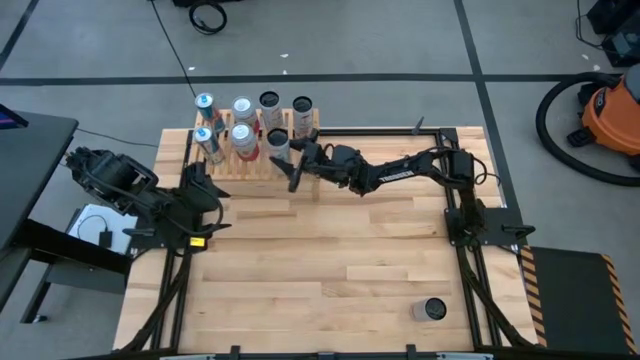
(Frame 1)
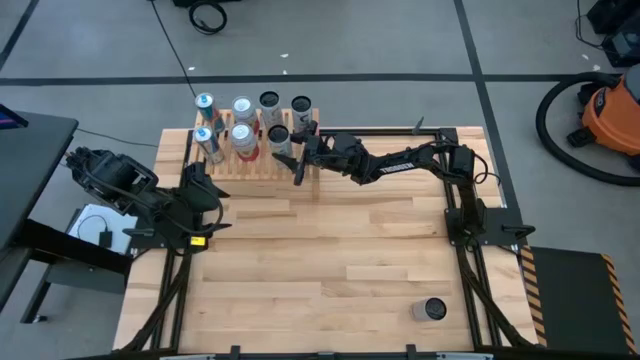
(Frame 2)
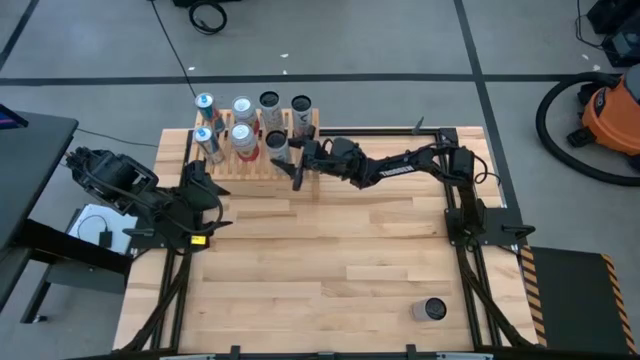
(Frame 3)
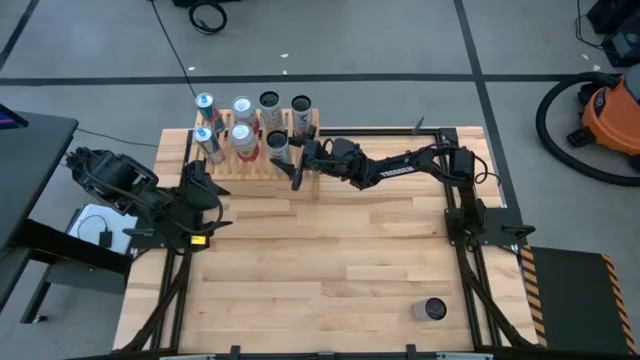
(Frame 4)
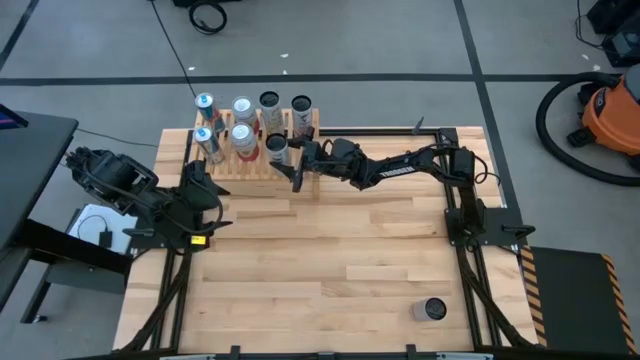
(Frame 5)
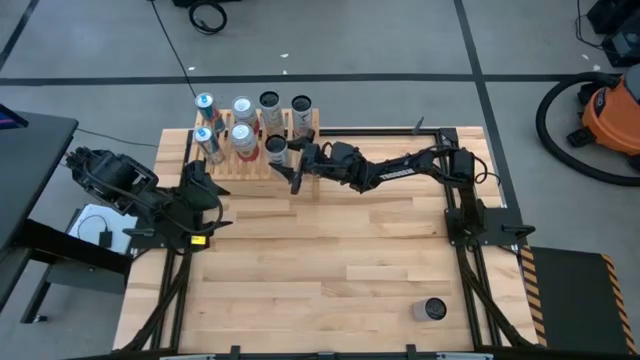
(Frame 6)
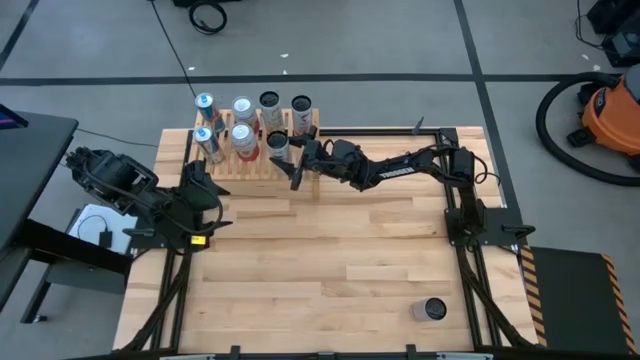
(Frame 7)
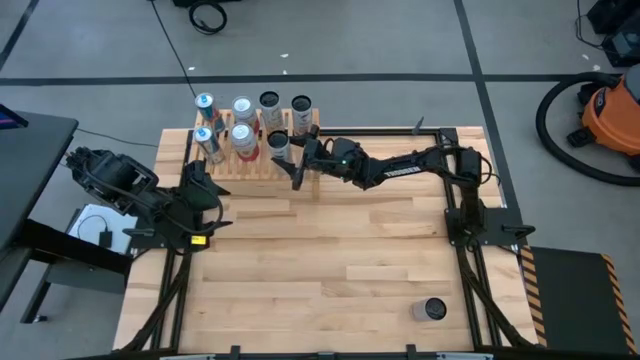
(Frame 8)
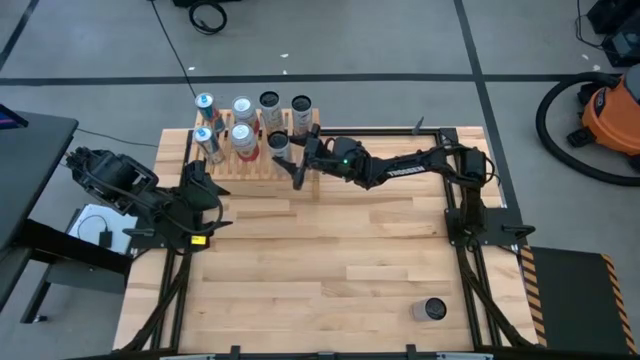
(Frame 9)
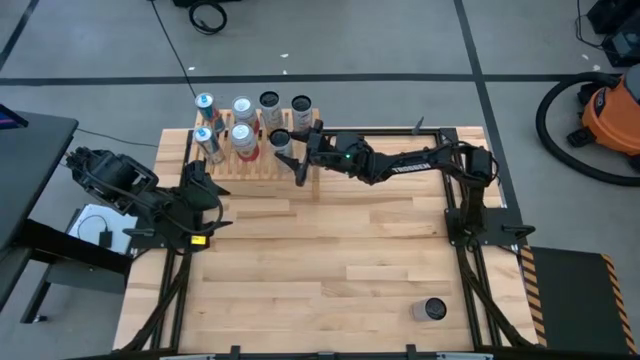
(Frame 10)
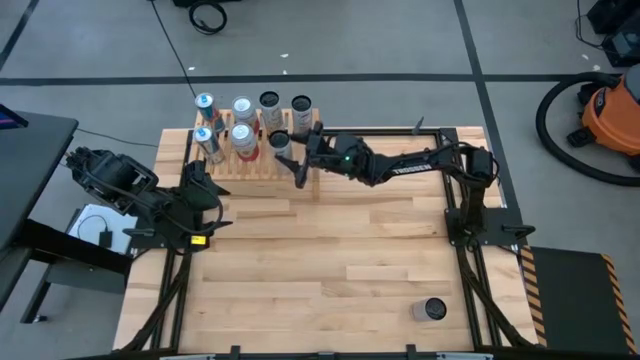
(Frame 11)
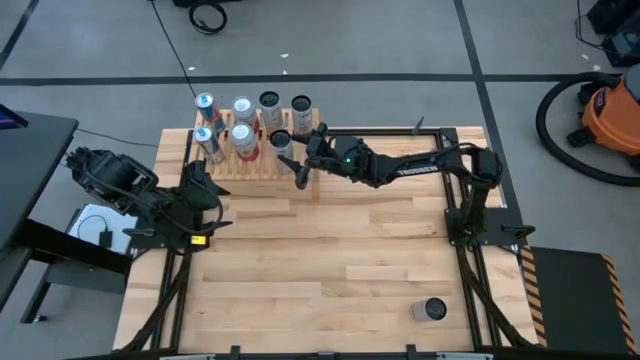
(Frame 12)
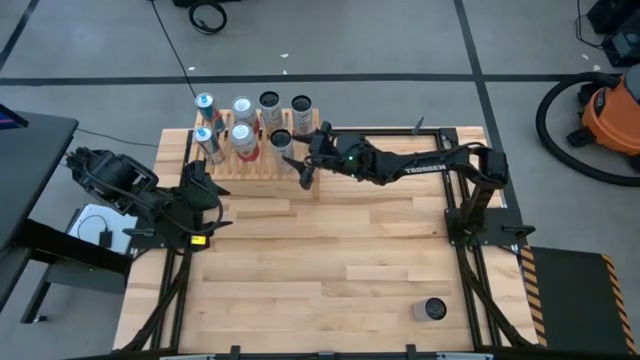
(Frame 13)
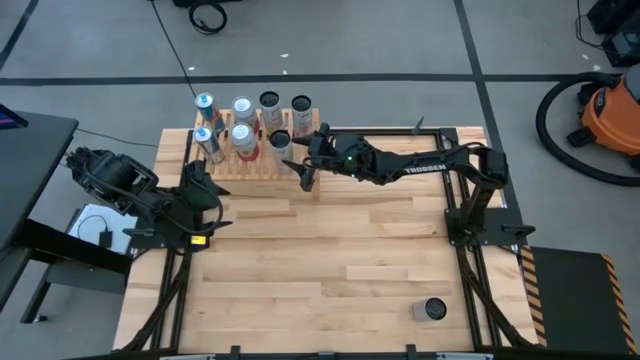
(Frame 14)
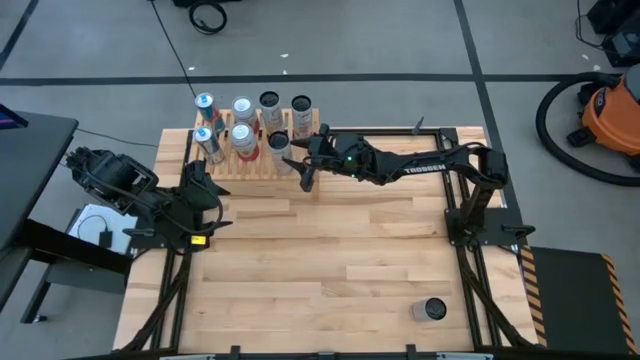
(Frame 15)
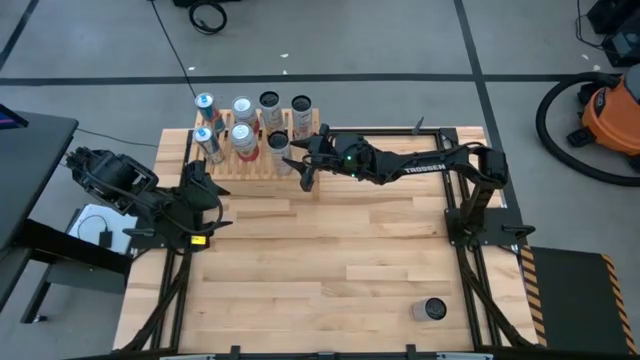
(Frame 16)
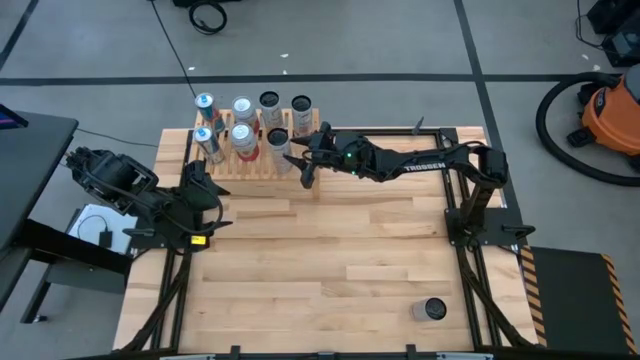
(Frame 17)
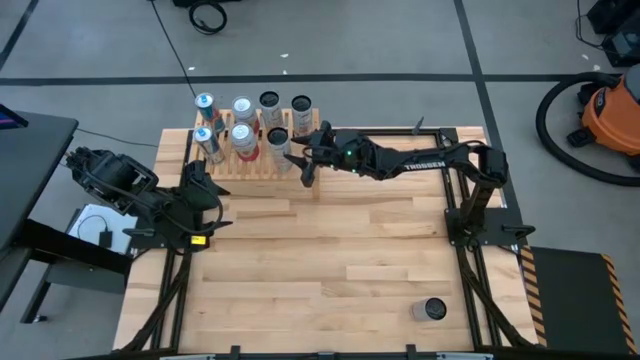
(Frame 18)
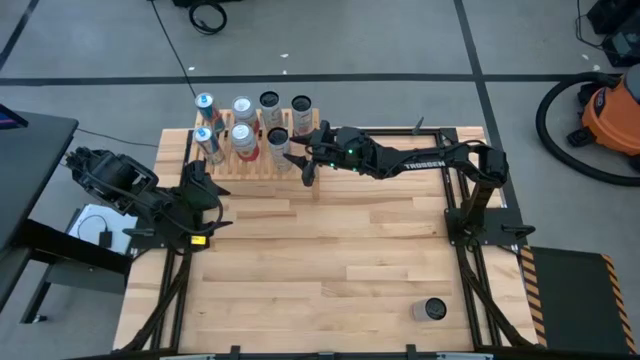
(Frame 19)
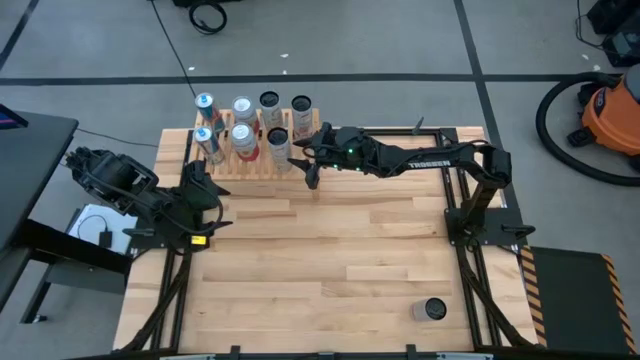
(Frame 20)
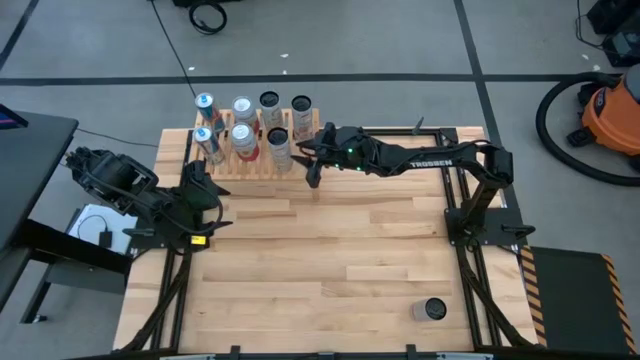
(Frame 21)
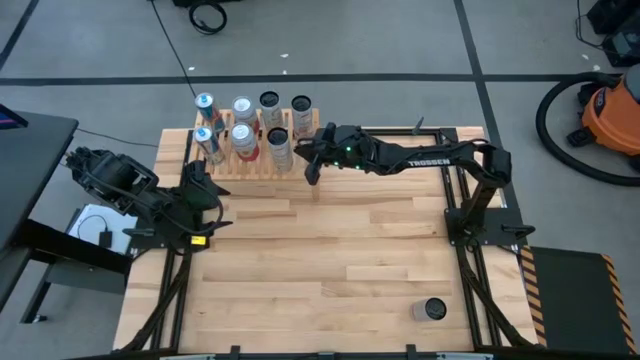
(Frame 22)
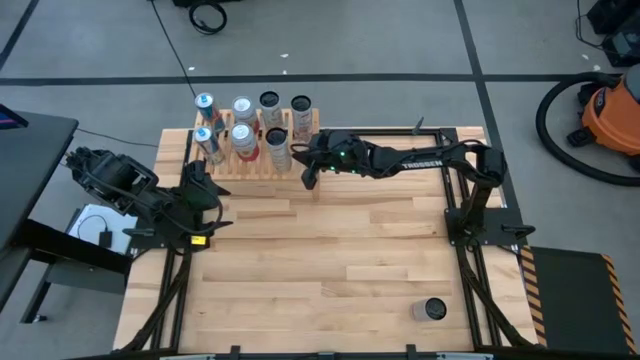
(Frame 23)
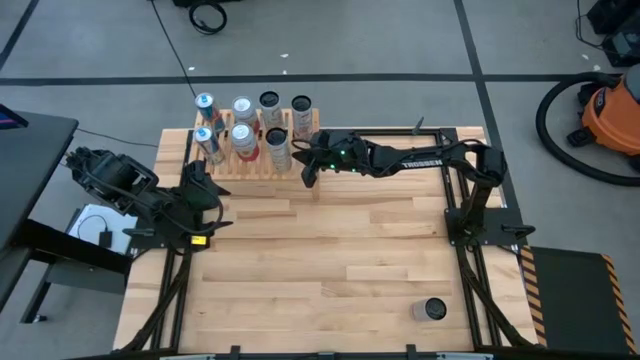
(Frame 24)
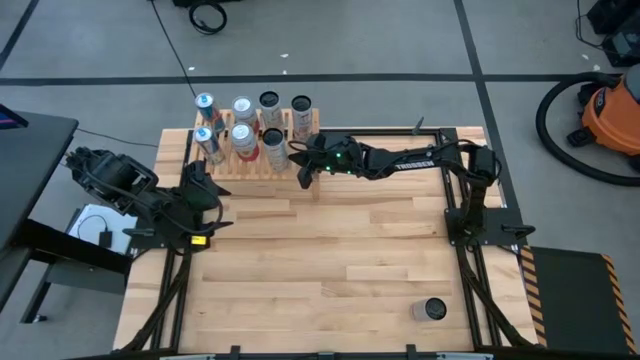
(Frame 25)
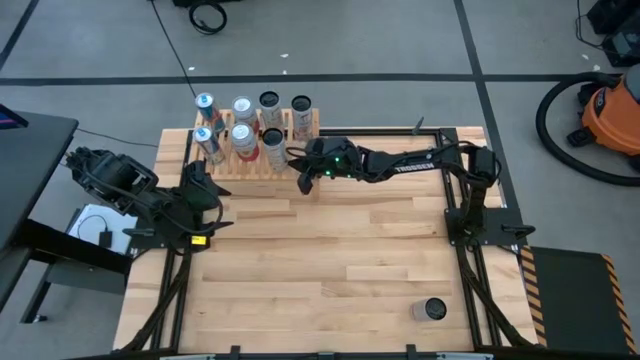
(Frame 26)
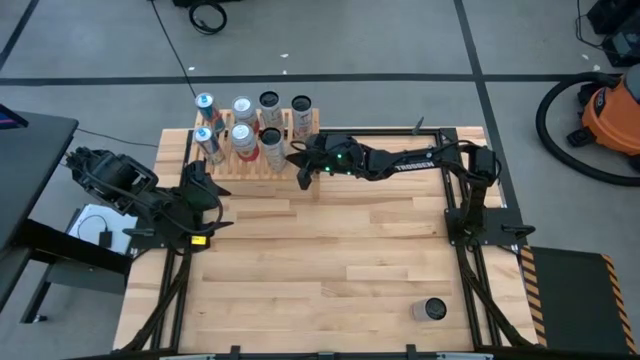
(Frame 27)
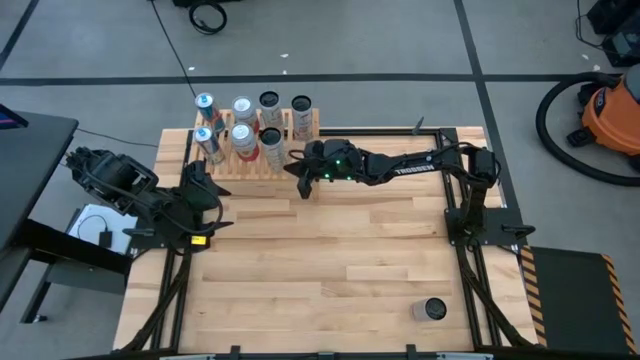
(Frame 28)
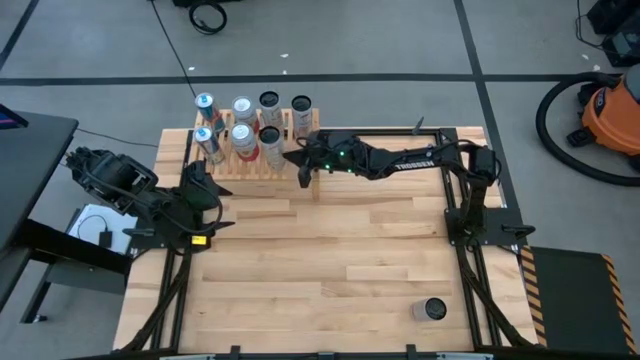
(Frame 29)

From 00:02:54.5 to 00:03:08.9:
Task: Place canned beverage on shelf
Put the white and yellow soda can on the shelf aligned with the other white and yellow soda can

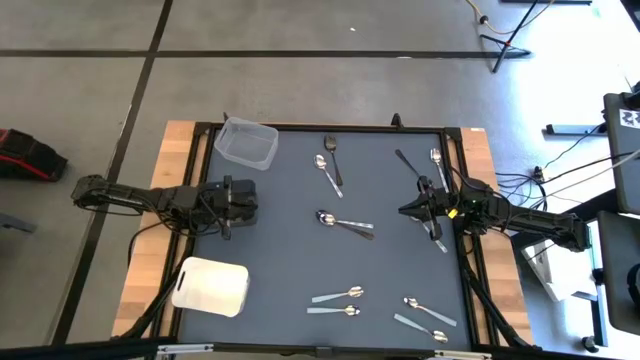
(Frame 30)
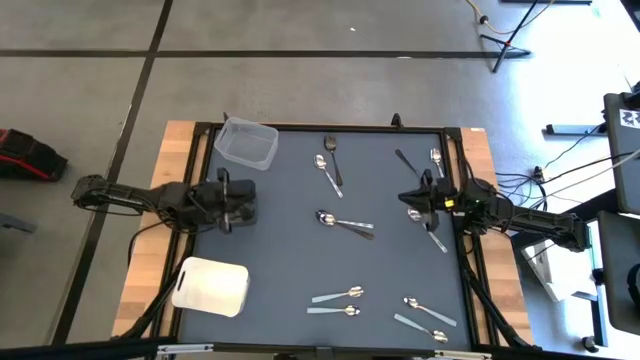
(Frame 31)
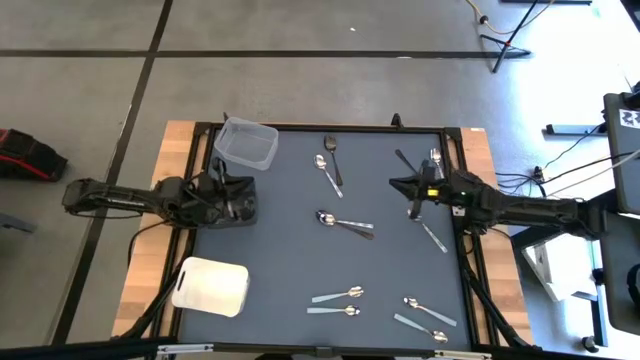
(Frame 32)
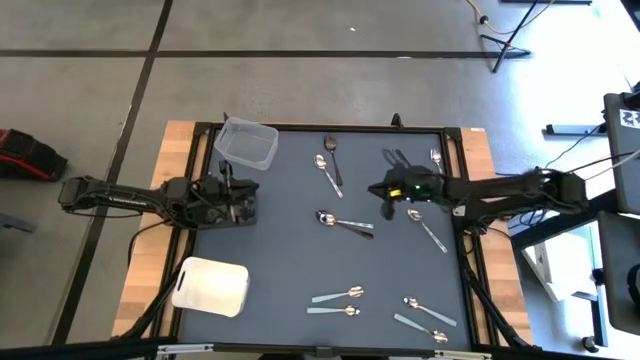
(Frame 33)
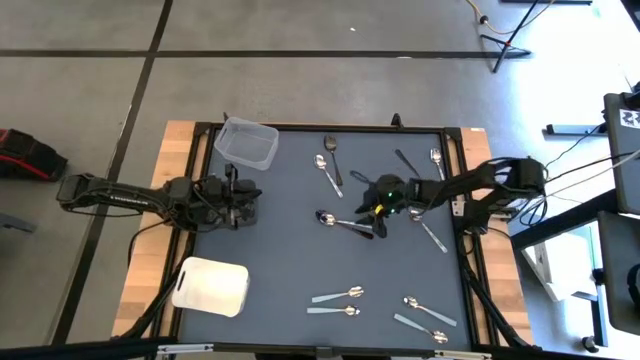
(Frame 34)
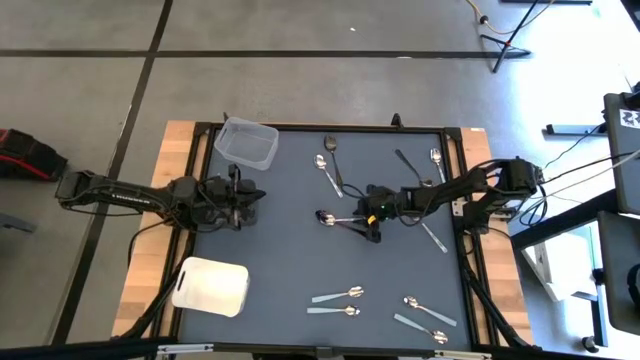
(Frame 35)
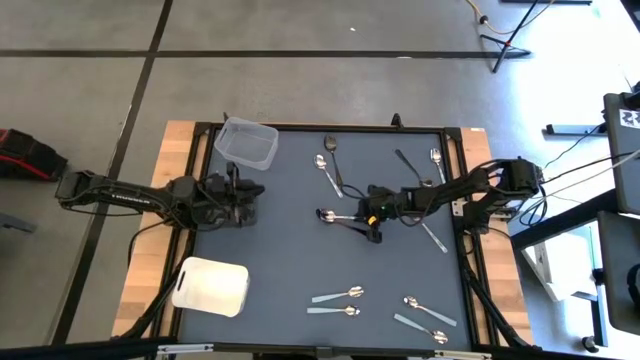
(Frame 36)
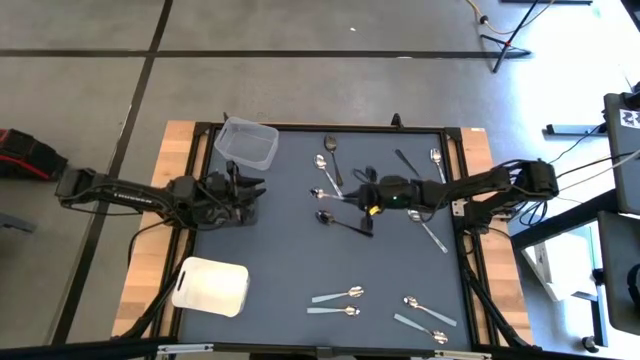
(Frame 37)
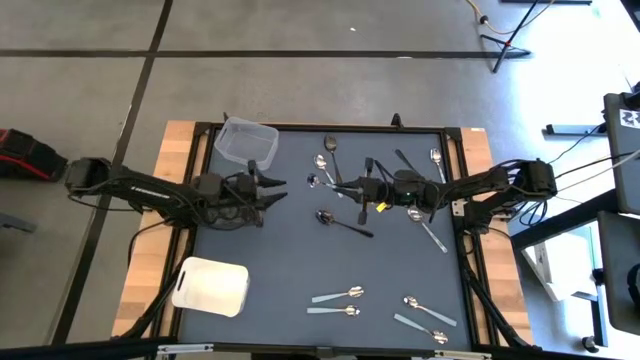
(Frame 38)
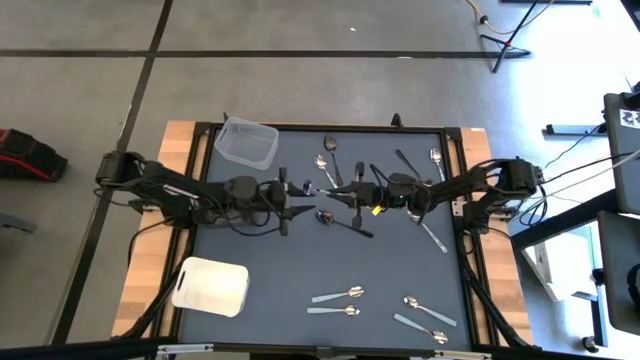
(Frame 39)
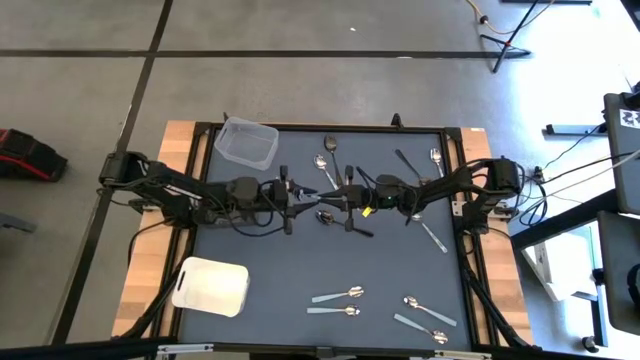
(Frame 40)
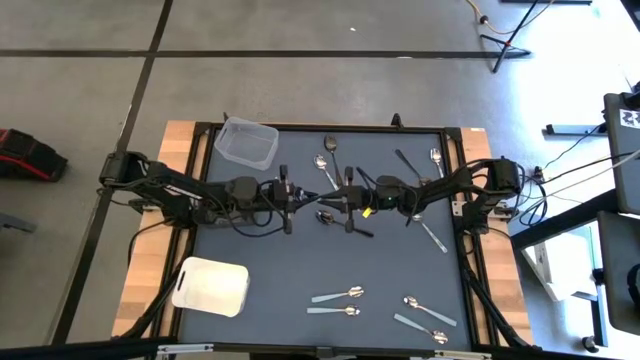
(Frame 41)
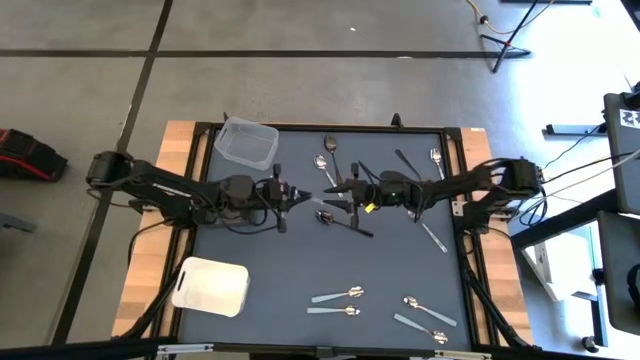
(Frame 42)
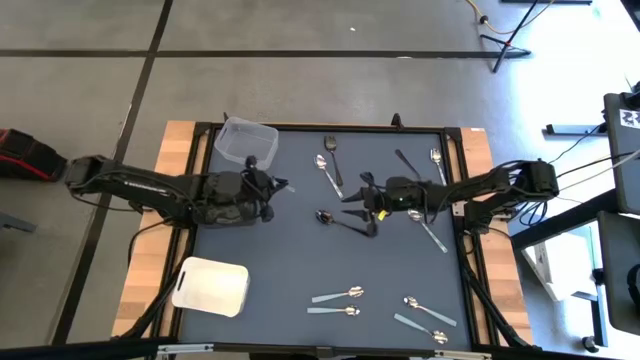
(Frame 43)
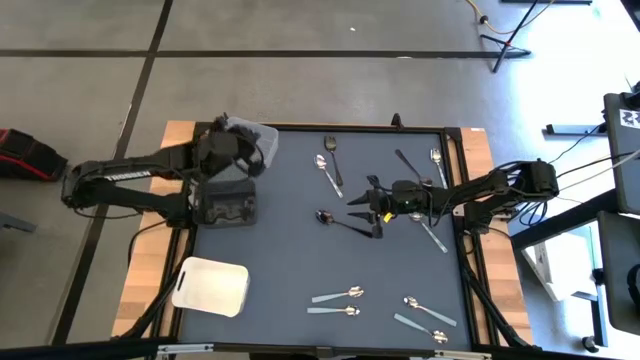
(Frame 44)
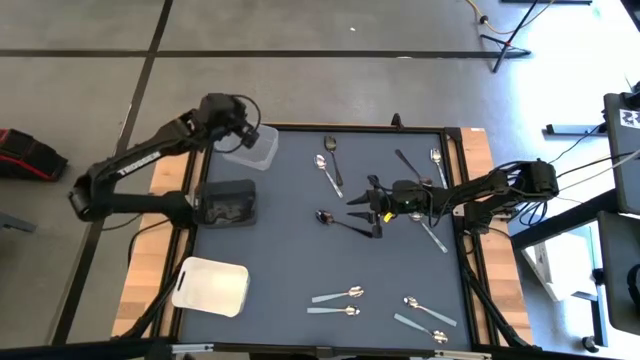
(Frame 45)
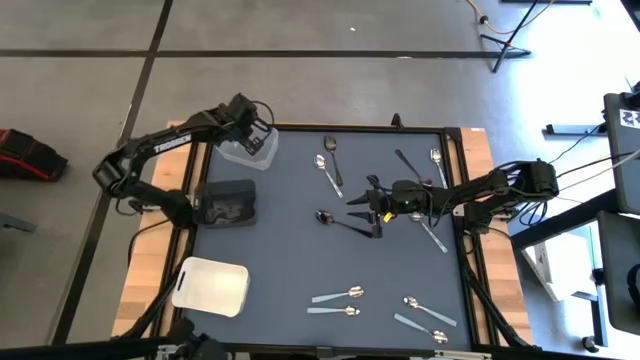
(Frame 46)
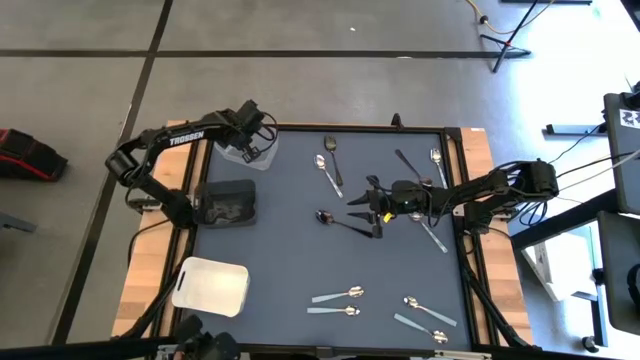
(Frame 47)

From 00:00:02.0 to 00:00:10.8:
Task: Sort silverware by color (type)
Put the green spoon into the transparent bin
